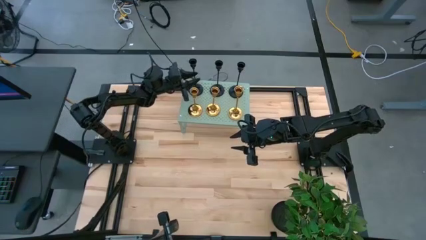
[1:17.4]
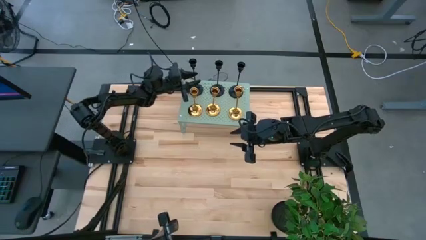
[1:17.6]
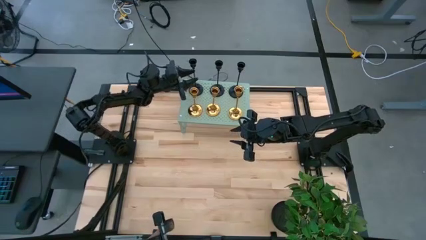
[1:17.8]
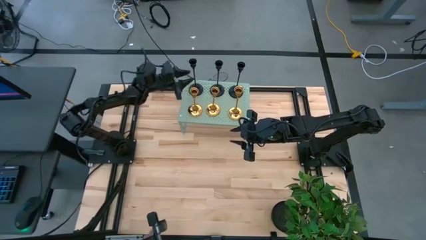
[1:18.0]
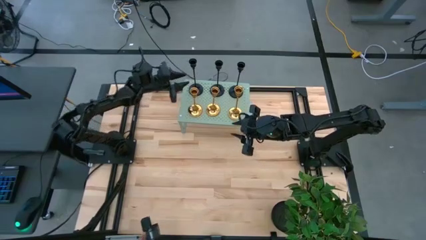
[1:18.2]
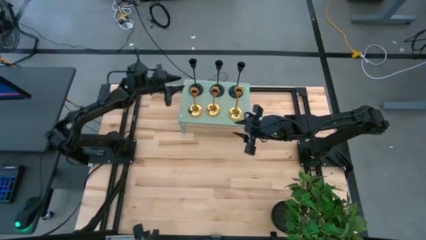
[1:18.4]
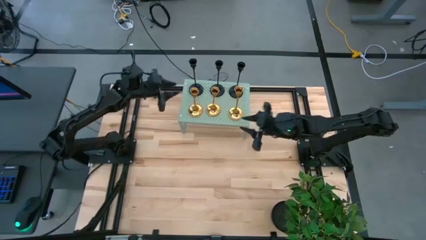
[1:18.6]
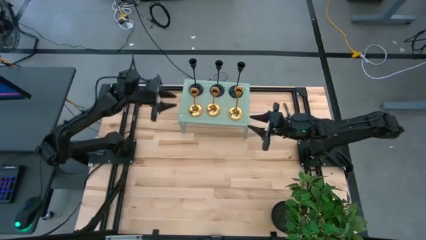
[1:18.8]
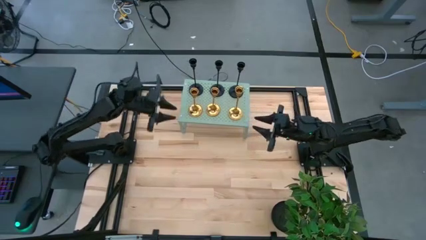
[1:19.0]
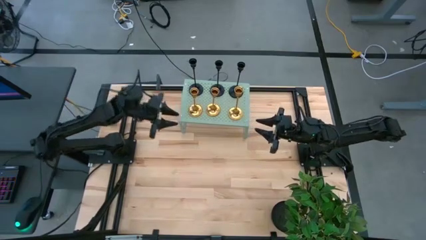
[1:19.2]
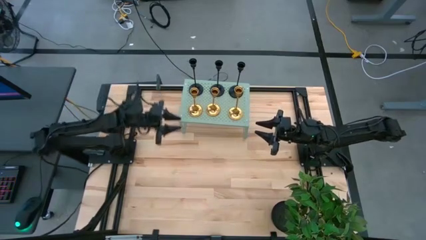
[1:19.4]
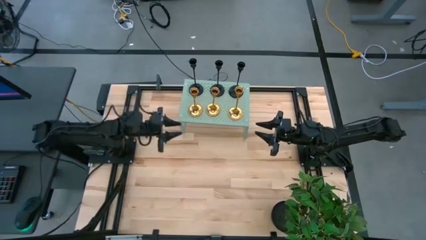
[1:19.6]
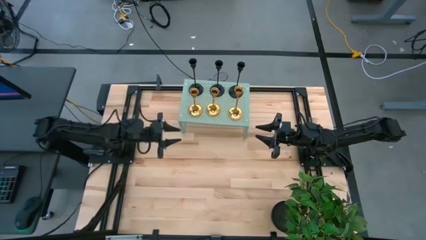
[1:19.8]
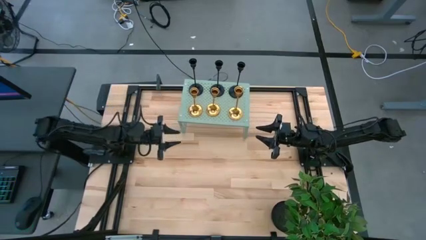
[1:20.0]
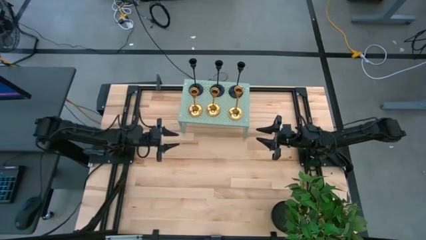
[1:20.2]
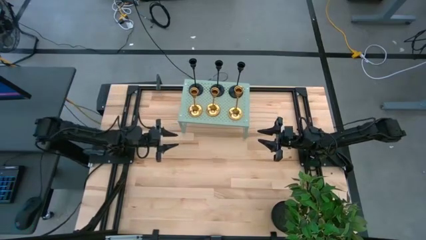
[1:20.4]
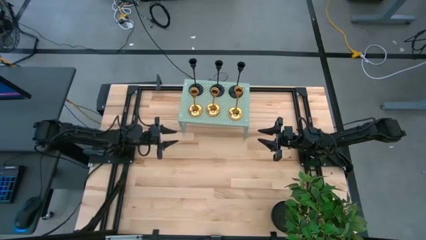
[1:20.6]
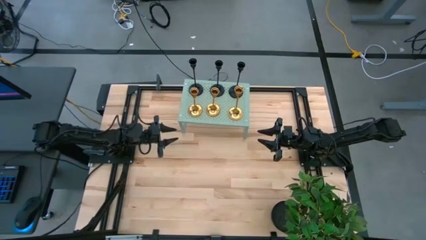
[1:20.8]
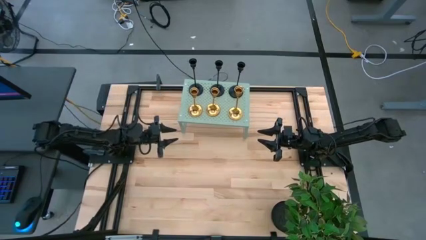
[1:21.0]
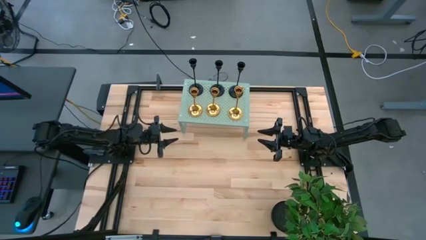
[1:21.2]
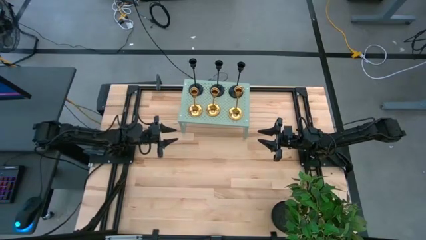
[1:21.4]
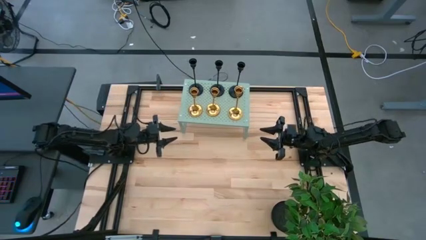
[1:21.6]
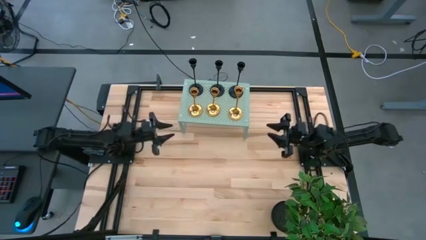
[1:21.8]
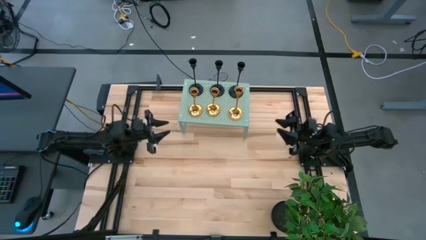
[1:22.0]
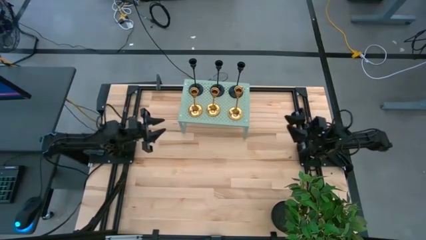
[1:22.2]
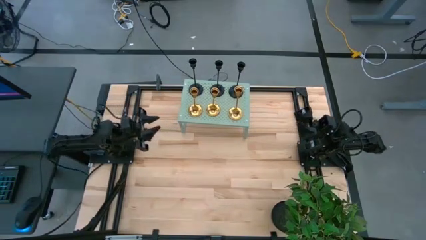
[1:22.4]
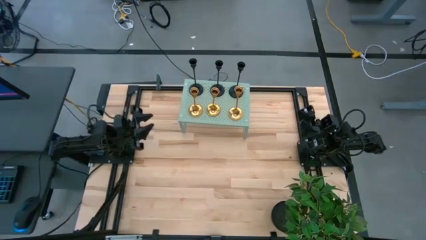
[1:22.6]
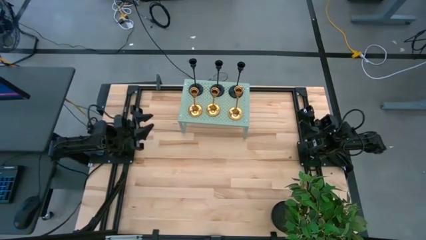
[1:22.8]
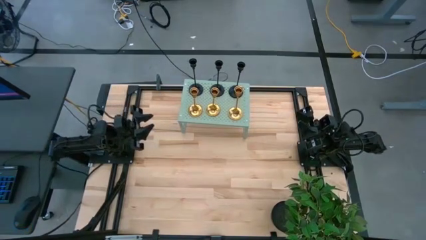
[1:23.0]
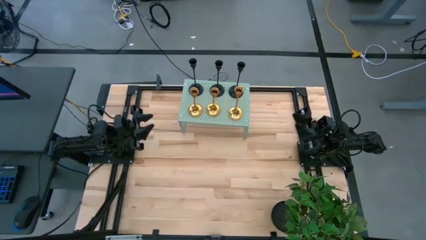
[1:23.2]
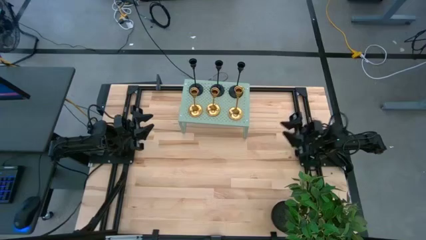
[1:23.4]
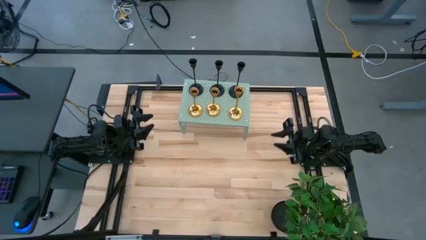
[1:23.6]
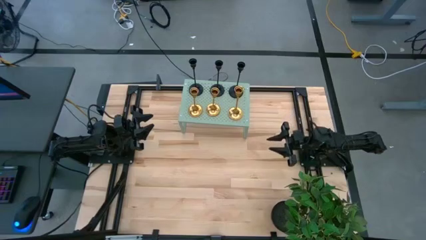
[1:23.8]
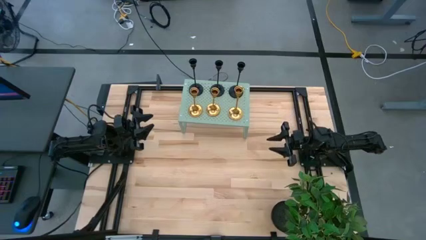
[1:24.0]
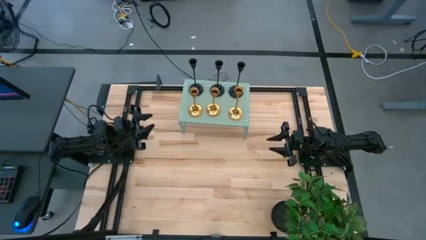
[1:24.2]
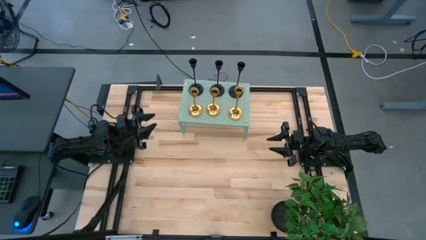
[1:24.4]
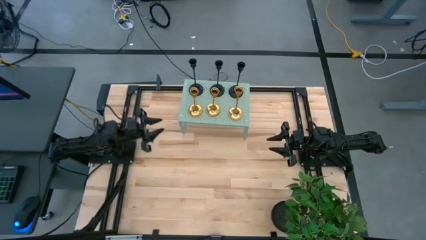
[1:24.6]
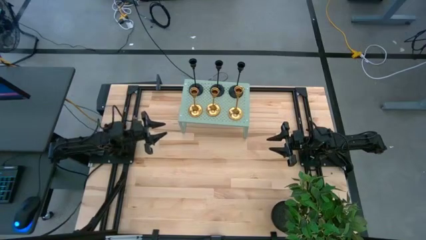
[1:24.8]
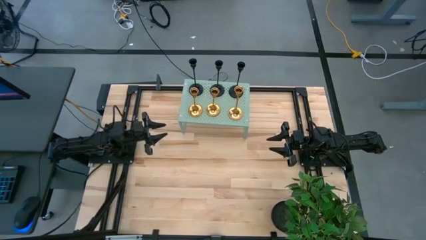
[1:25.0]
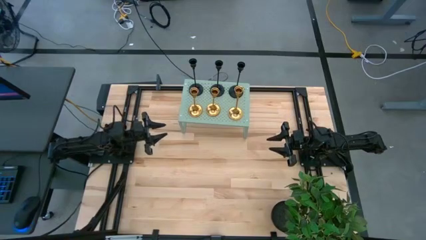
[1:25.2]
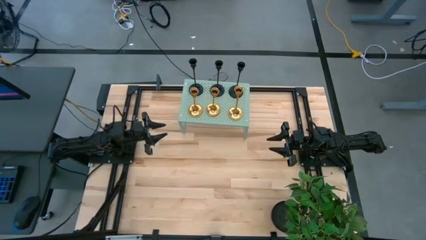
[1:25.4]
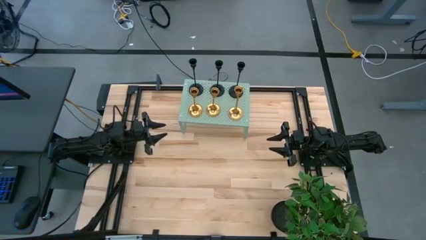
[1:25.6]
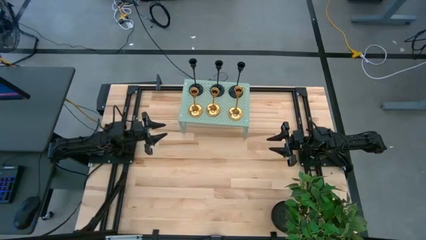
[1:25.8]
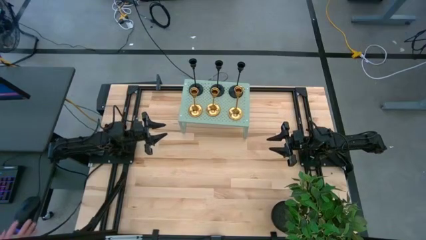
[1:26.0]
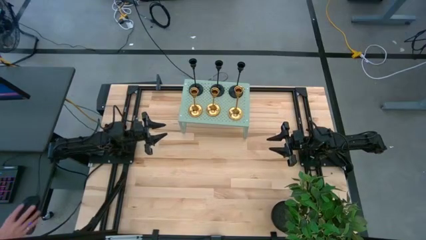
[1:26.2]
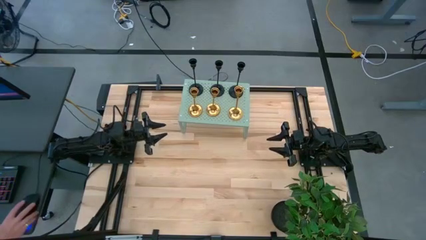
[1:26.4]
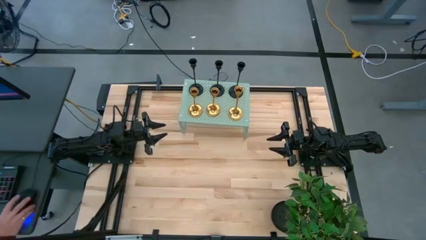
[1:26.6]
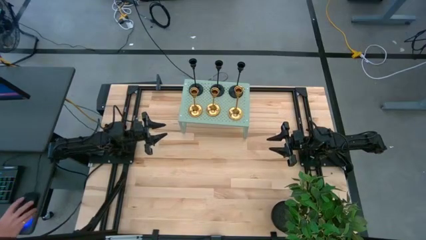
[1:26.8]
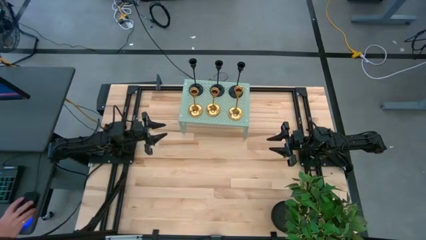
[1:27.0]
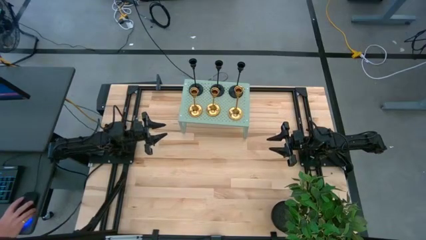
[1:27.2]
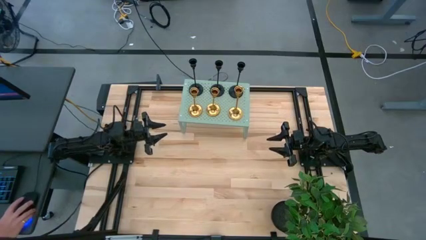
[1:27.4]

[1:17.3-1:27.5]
Task: Pick & Place candle stick holders
Return to Home Position

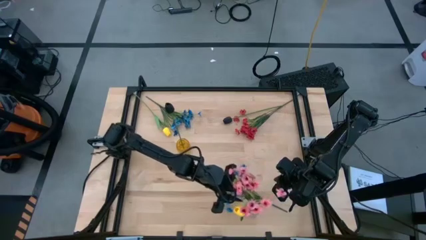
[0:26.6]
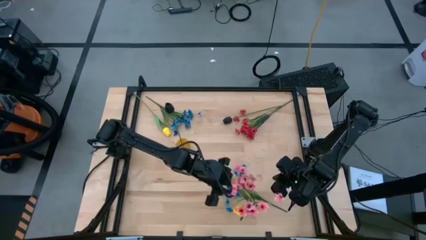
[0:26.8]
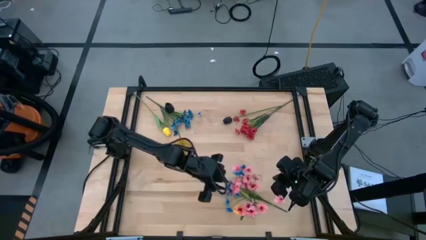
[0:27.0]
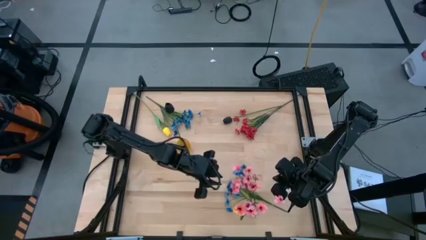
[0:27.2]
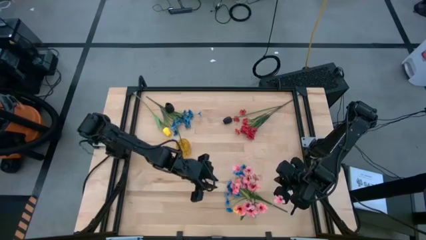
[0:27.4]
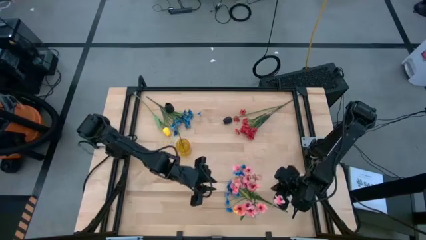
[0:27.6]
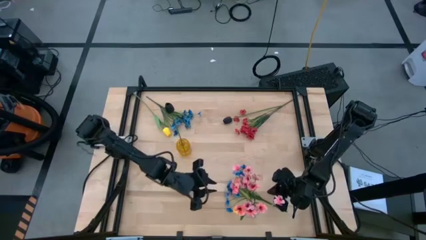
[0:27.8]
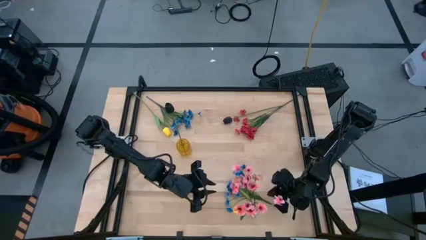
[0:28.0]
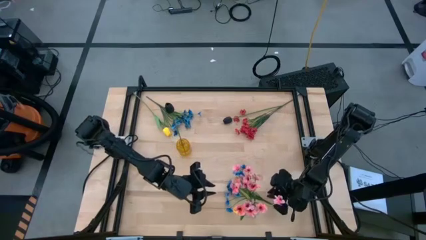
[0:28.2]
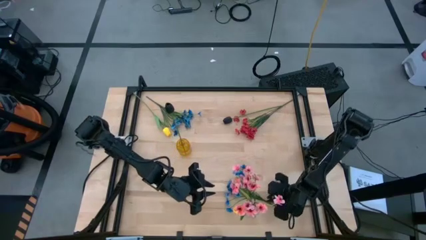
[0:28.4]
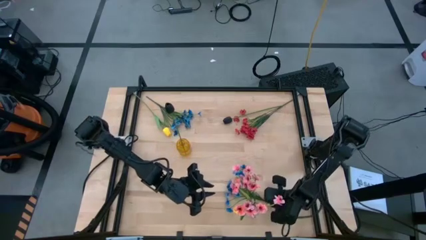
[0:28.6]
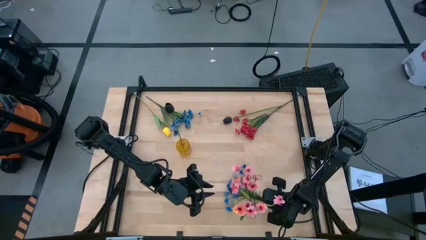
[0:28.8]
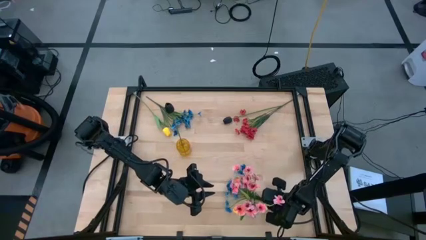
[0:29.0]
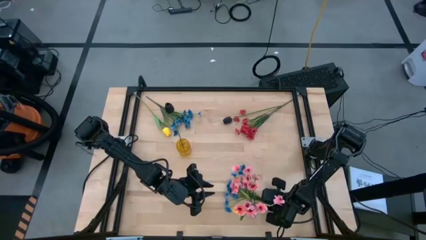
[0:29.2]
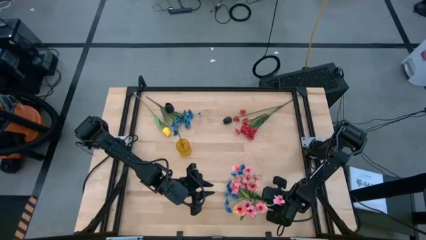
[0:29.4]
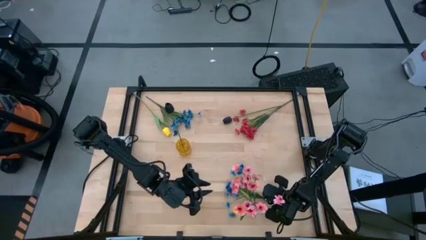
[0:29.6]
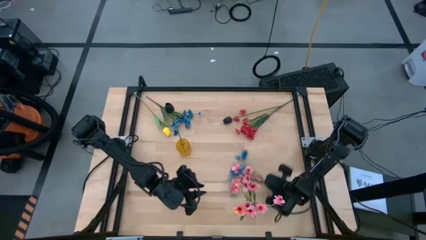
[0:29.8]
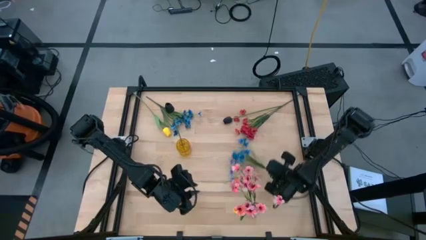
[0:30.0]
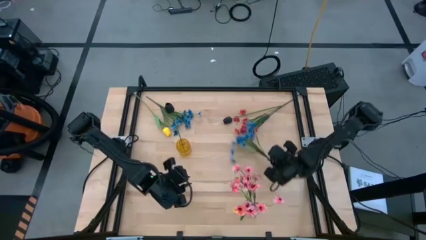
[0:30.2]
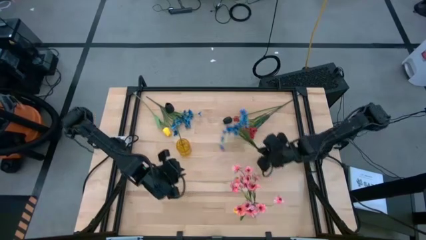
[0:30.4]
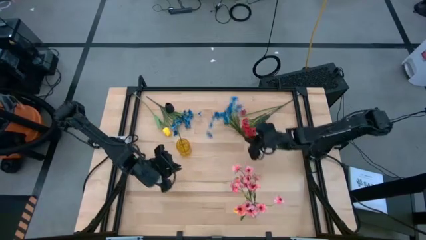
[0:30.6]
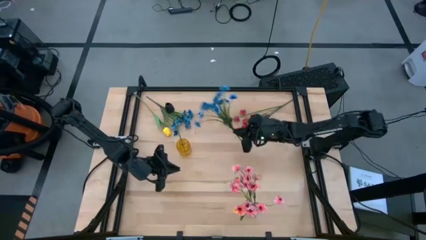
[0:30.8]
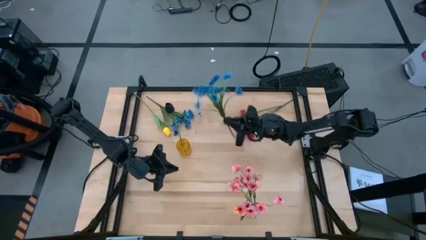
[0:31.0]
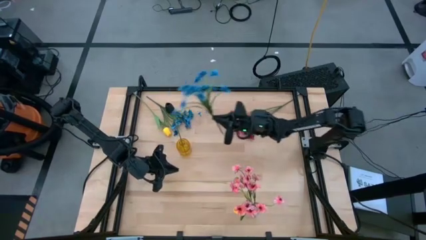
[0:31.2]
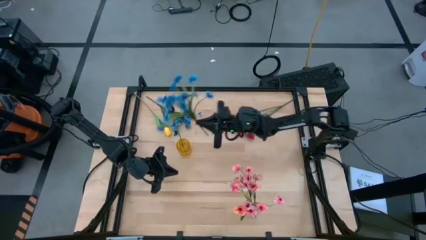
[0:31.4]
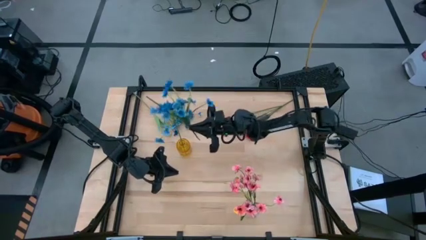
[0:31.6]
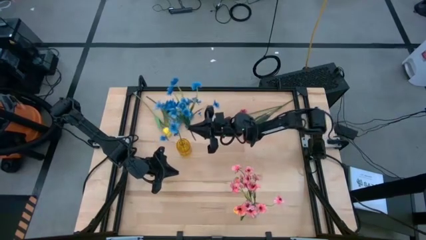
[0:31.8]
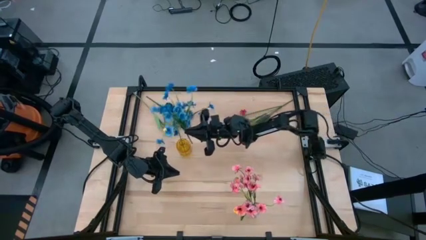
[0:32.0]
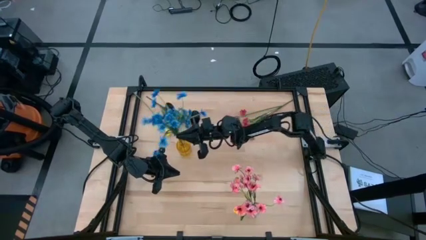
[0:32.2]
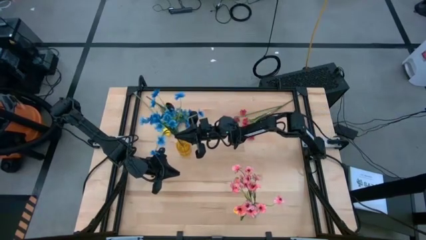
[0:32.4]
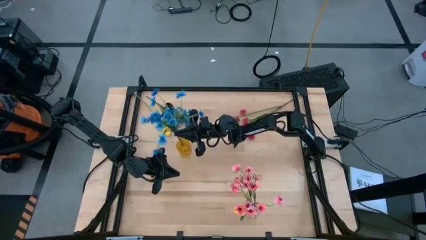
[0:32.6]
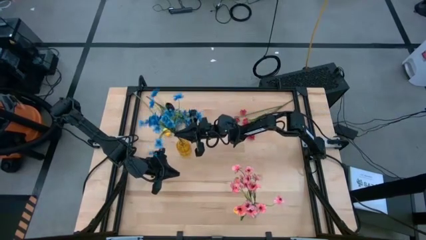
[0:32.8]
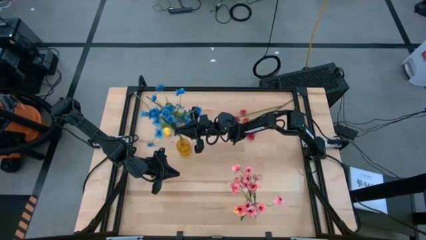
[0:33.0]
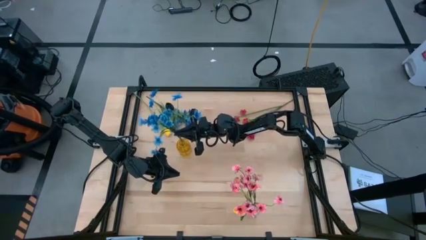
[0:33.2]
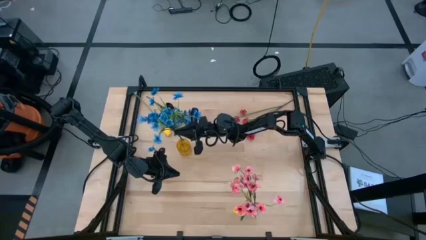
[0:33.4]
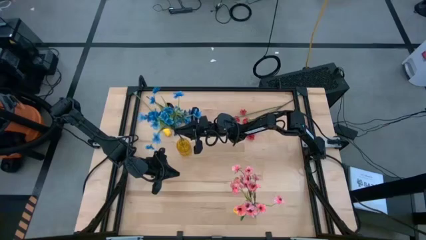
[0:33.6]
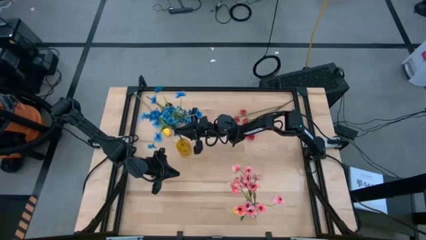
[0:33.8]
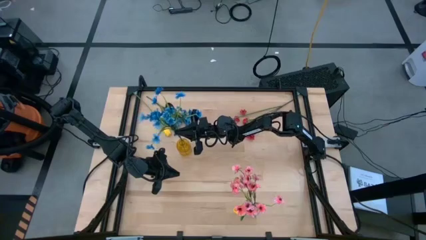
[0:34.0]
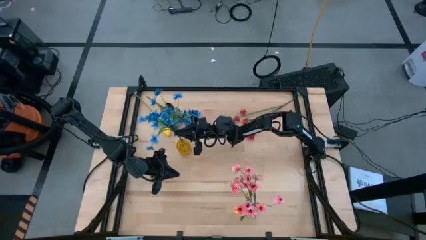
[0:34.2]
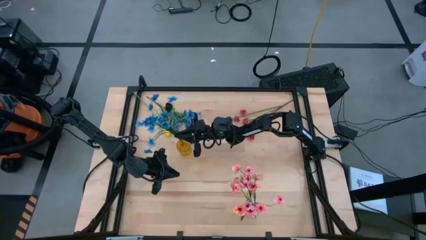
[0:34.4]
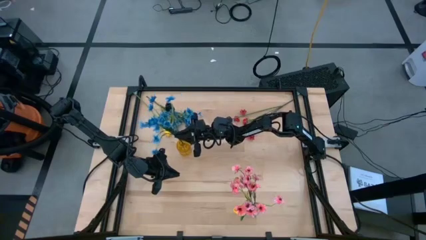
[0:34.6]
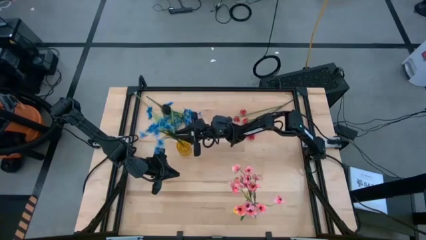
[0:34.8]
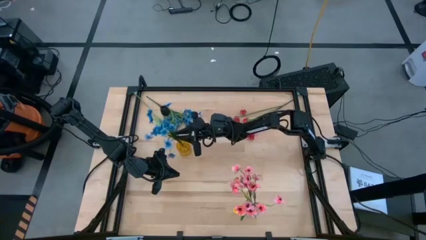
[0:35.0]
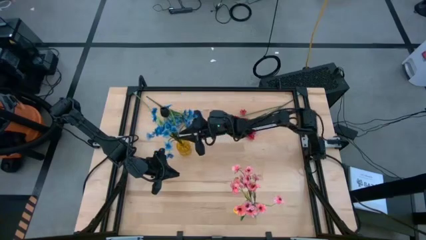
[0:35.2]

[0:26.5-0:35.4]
Task: Sort flowers into vase by color
Put the bottom blue flowers into the yellow vase
